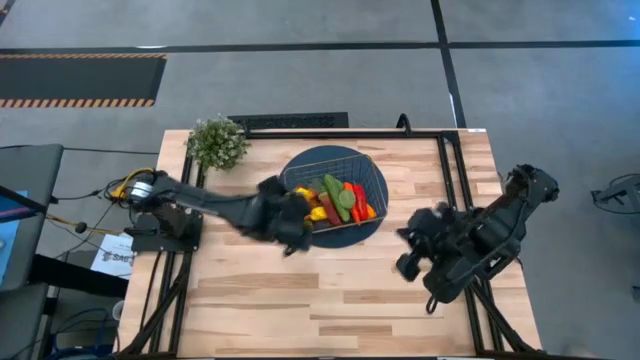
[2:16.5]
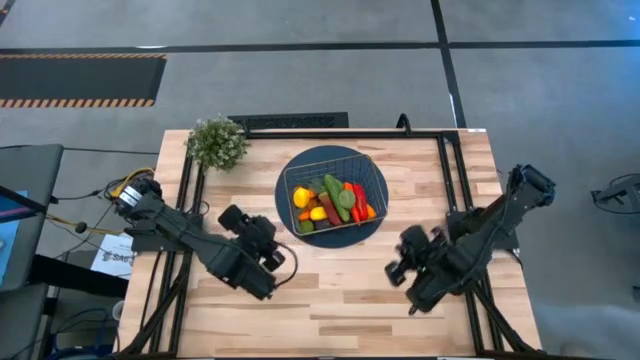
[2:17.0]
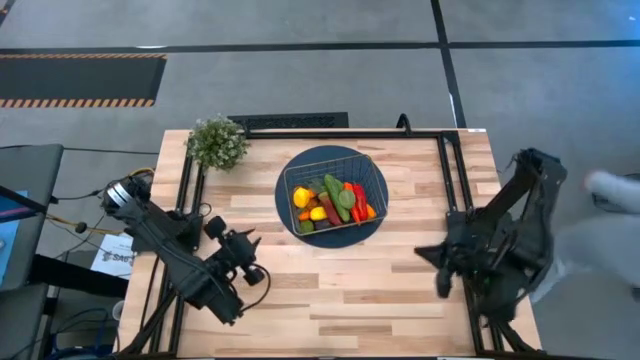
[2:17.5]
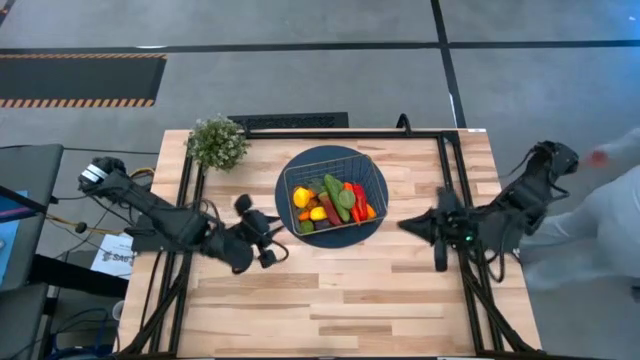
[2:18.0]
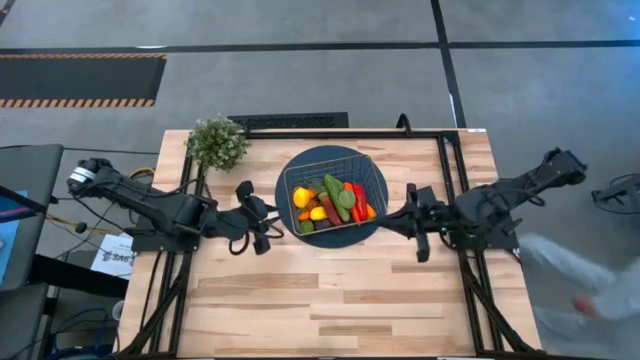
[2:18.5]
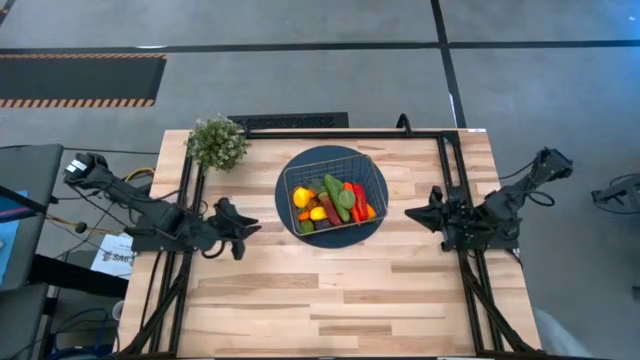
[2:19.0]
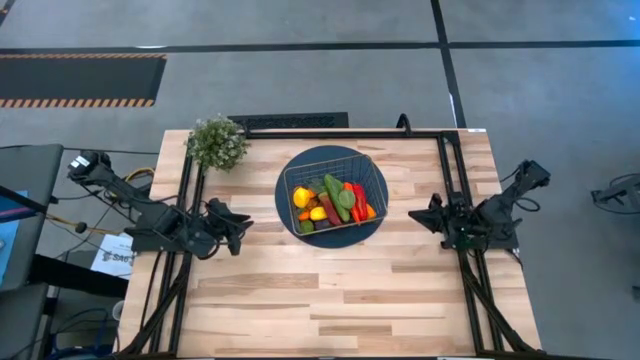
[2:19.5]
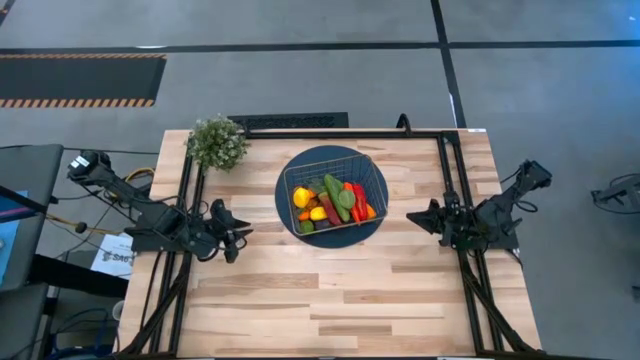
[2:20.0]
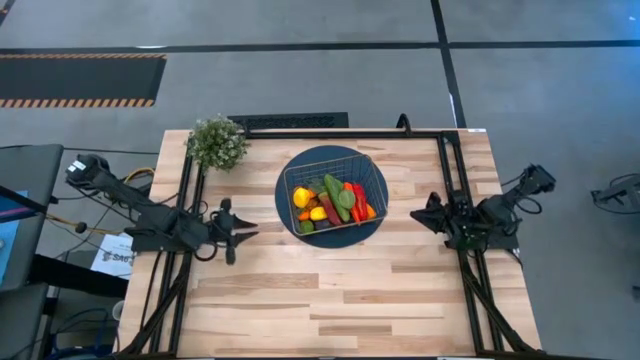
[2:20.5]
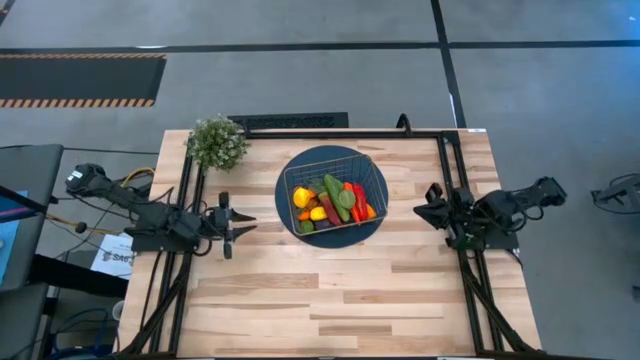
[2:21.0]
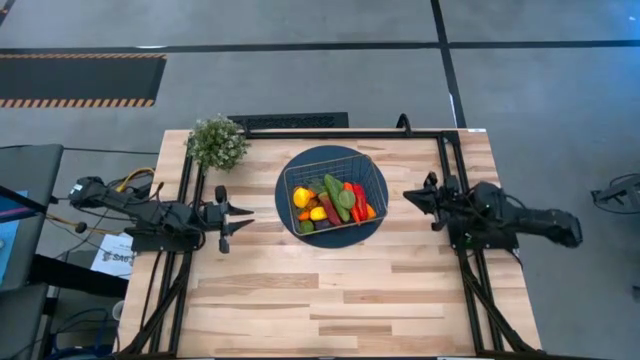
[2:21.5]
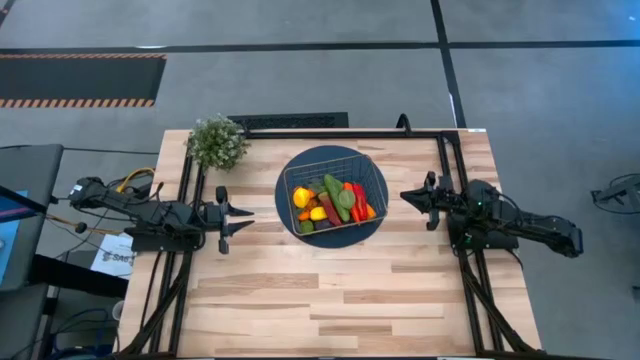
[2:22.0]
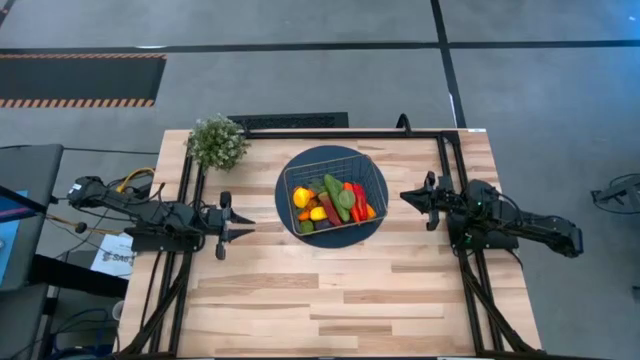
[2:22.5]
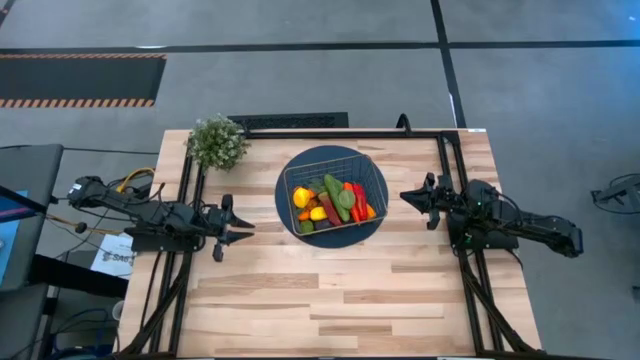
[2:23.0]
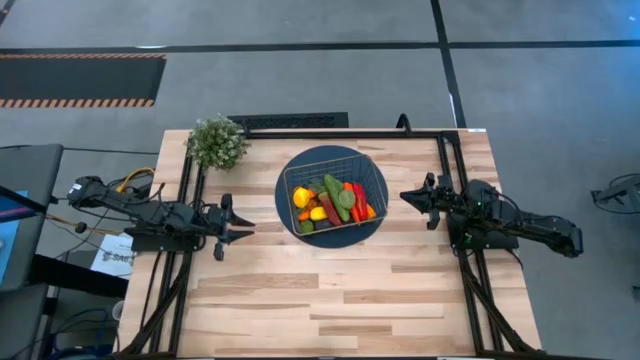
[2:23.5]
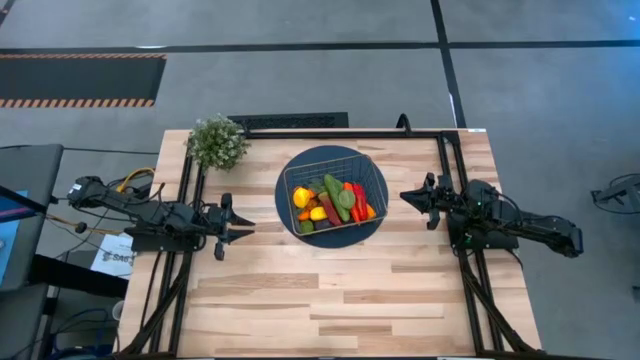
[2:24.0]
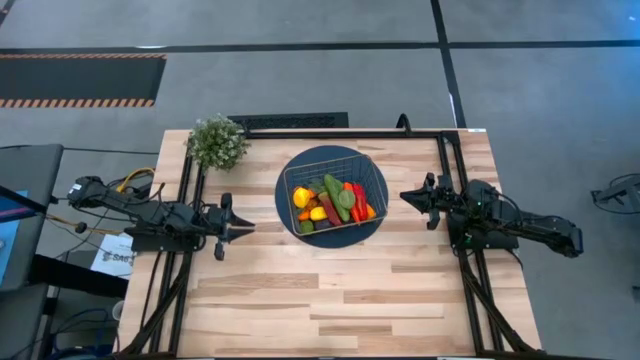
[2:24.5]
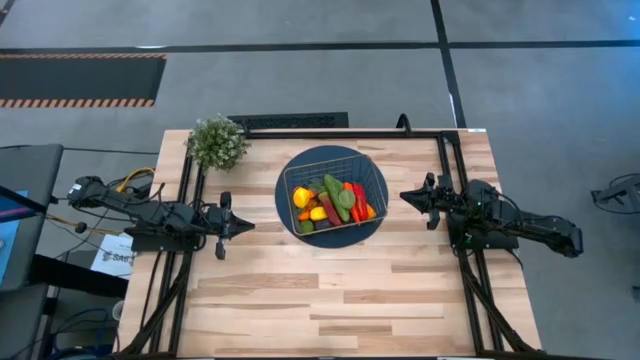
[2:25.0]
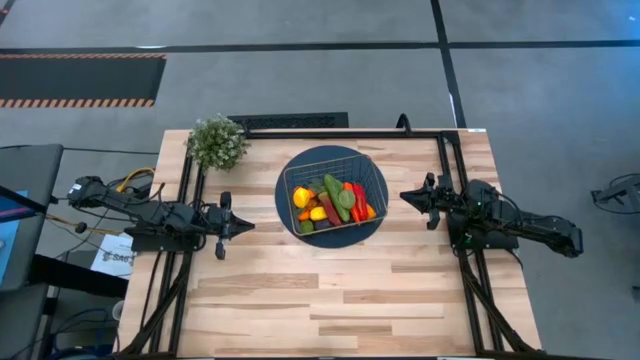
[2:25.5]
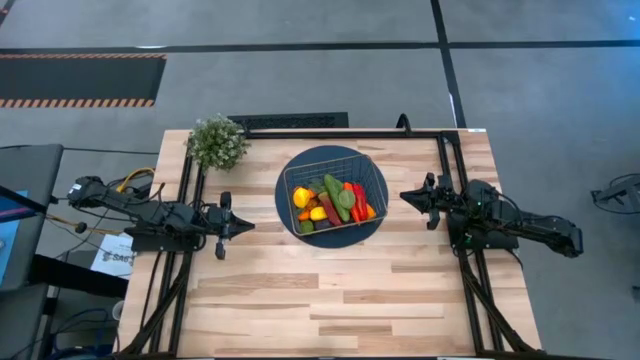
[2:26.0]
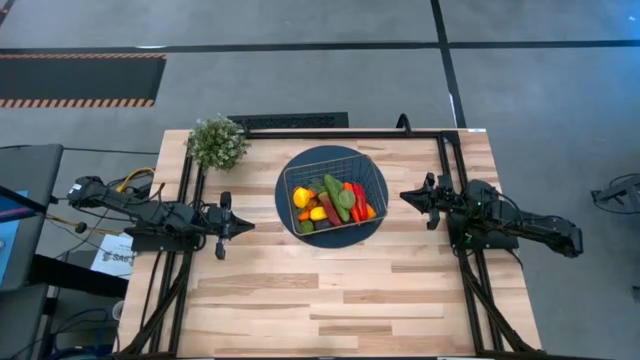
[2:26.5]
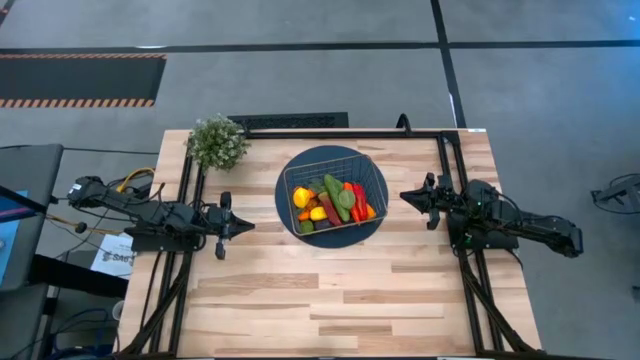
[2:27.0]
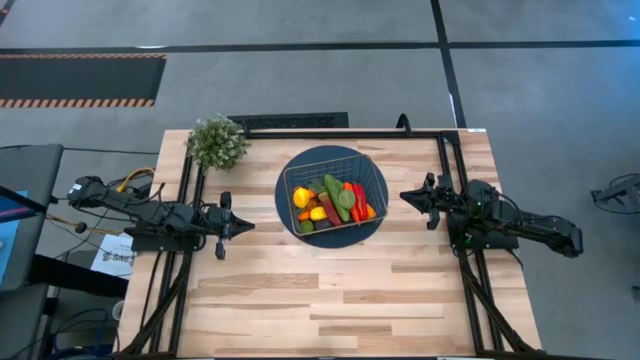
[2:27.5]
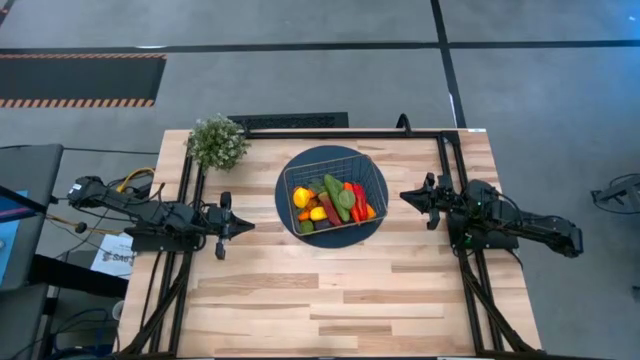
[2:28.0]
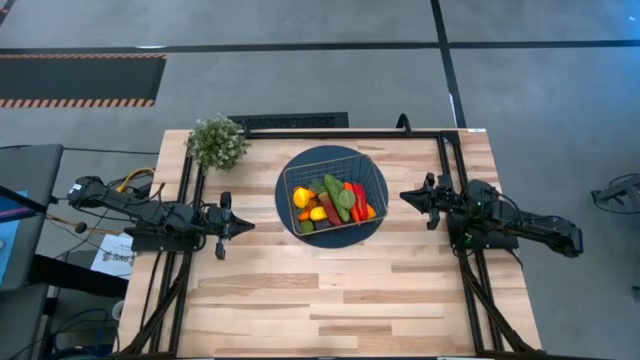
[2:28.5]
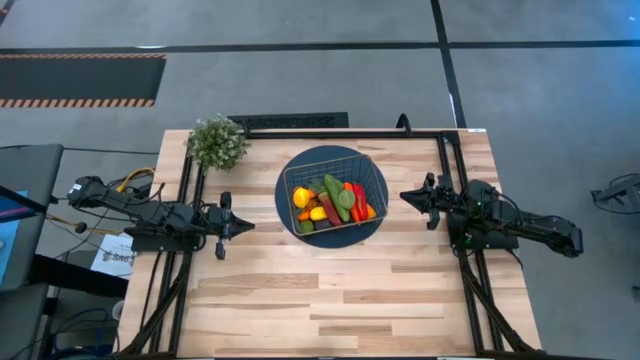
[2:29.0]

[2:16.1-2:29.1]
Task: Build produce basket
Return to Home Position

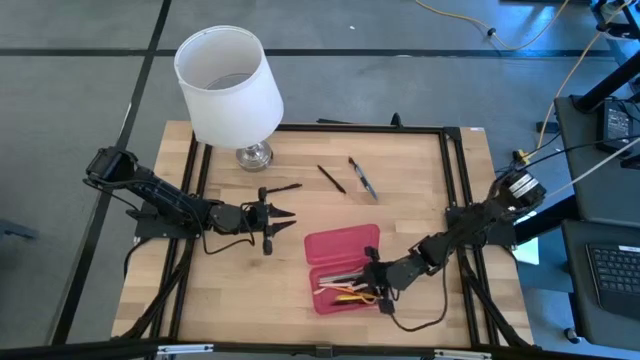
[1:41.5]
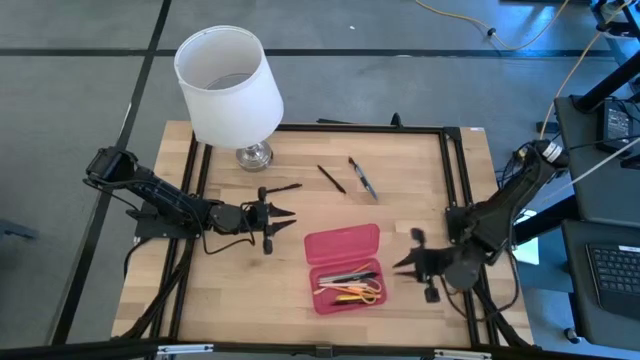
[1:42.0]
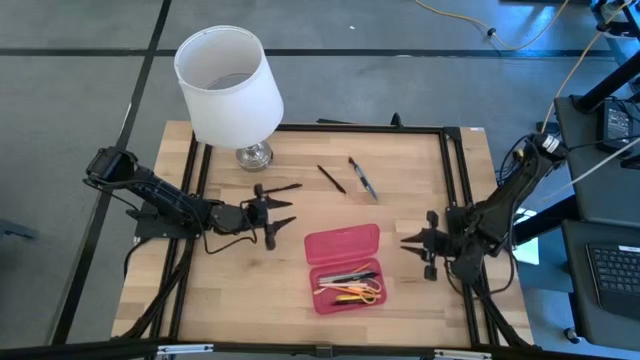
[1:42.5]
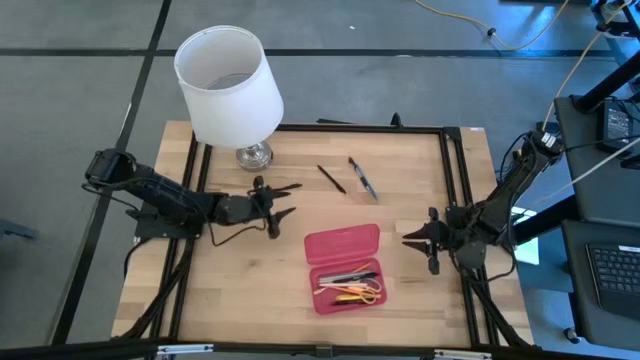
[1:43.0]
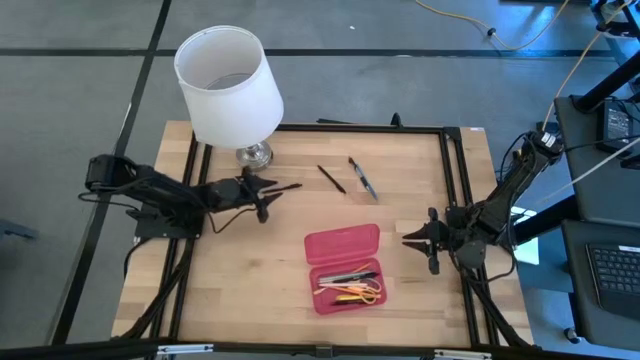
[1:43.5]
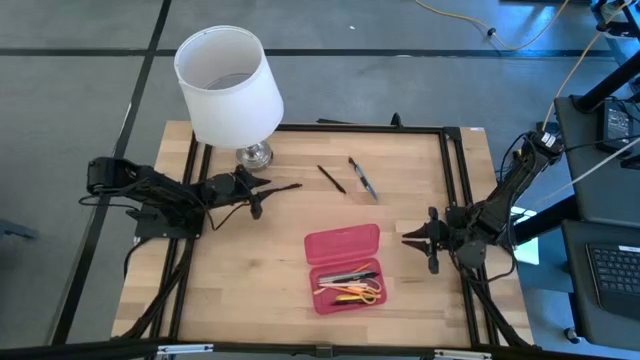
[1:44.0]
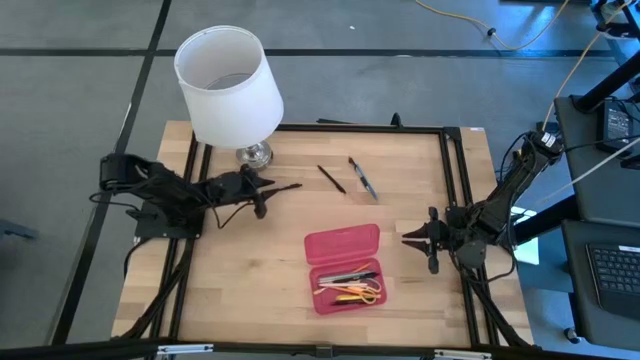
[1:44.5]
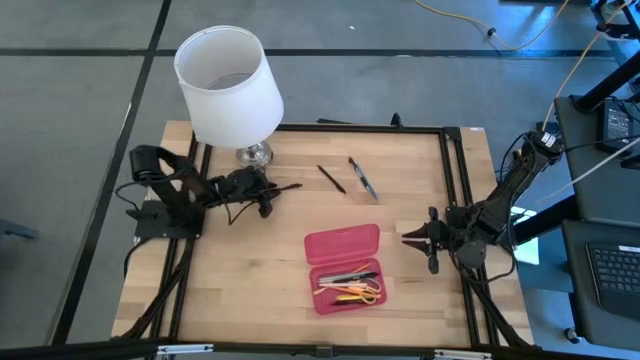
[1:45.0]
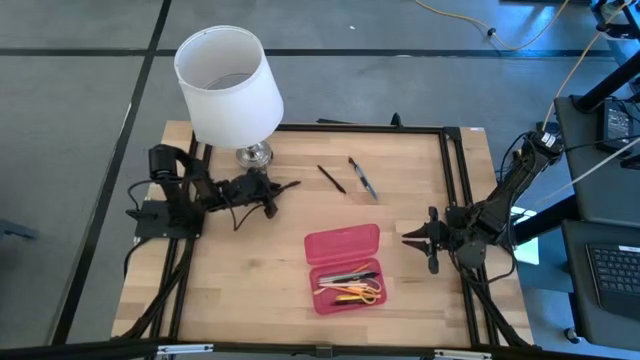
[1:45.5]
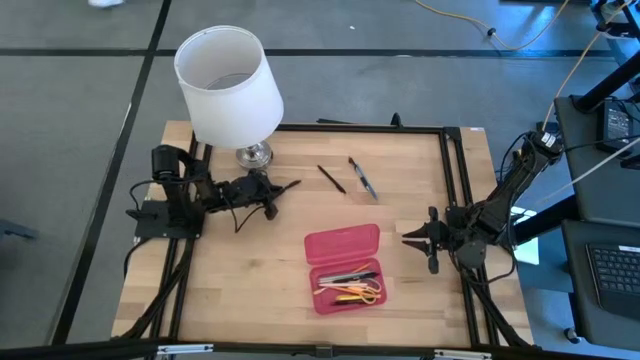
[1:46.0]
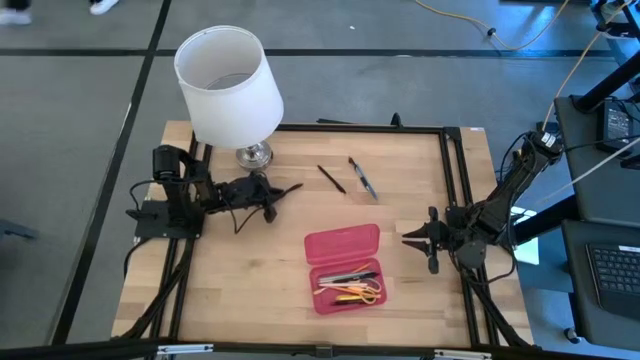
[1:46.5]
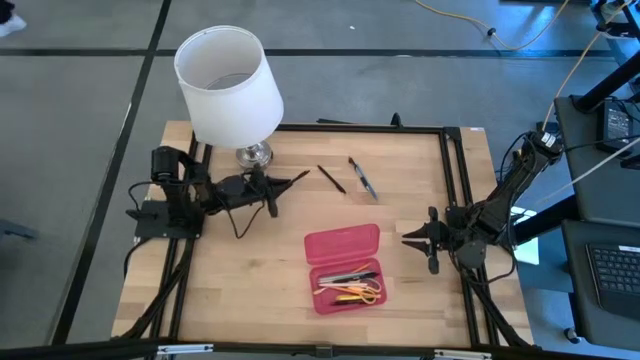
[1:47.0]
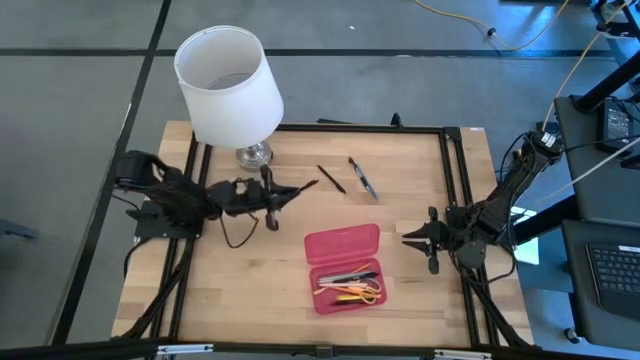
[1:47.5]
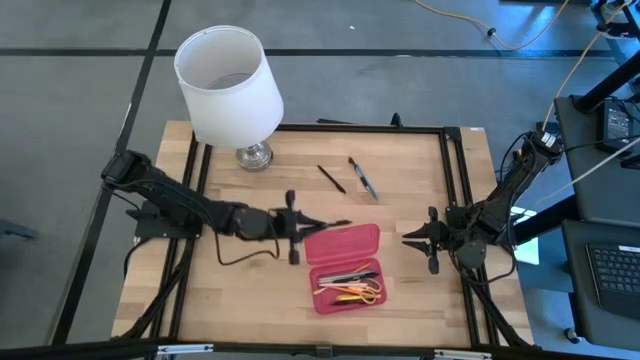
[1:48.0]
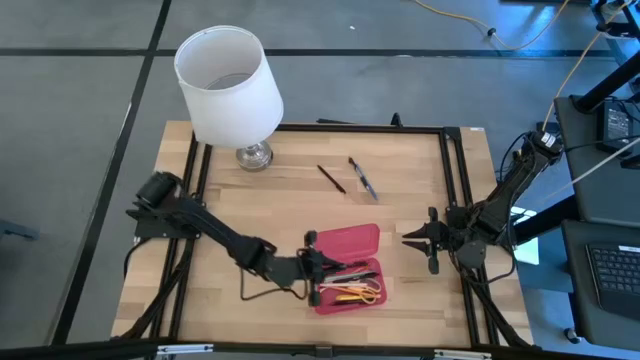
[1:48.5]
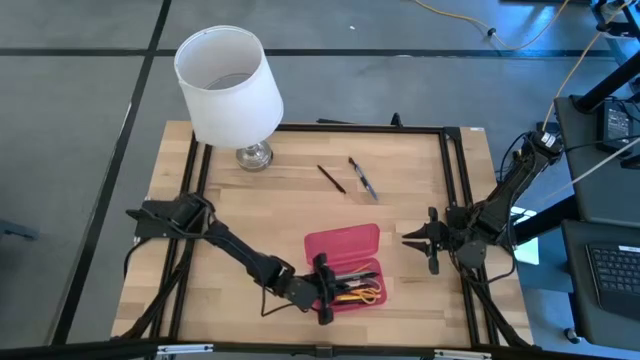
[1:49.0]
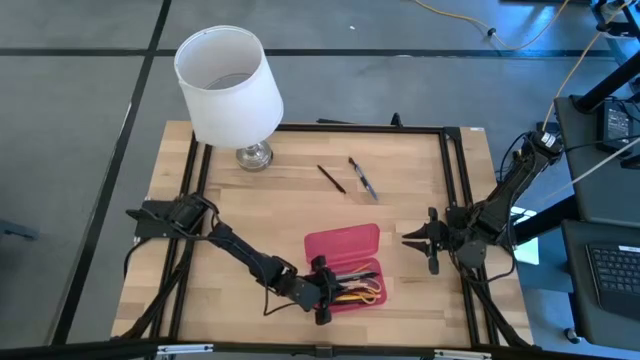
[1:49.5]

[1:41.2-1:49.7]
Task: Pick & place school supplies into a supply box
Put the black pen into the pink supply box
